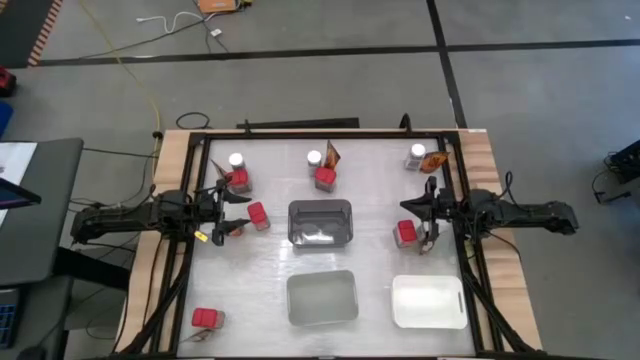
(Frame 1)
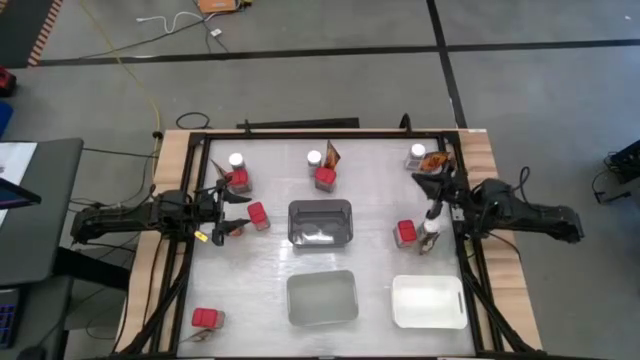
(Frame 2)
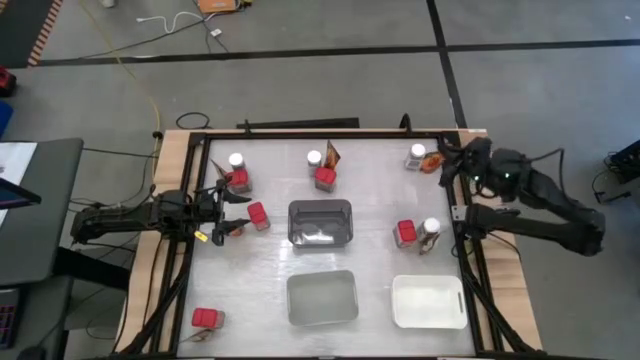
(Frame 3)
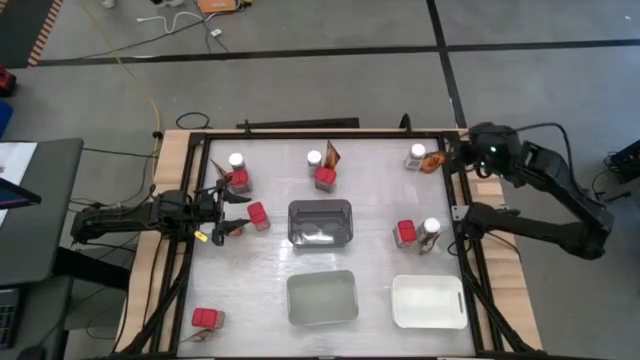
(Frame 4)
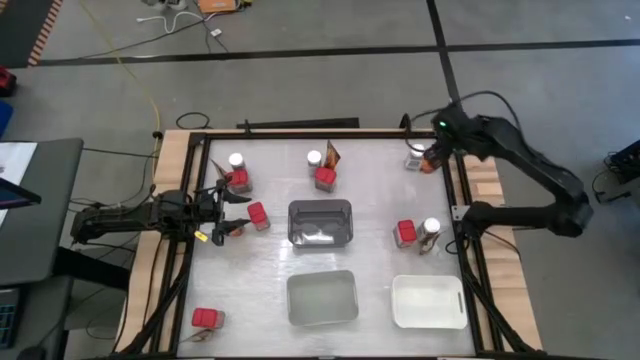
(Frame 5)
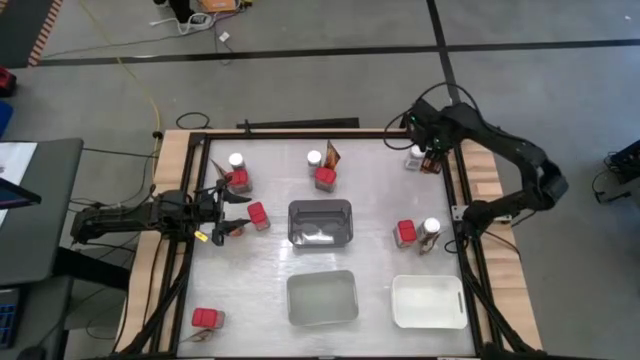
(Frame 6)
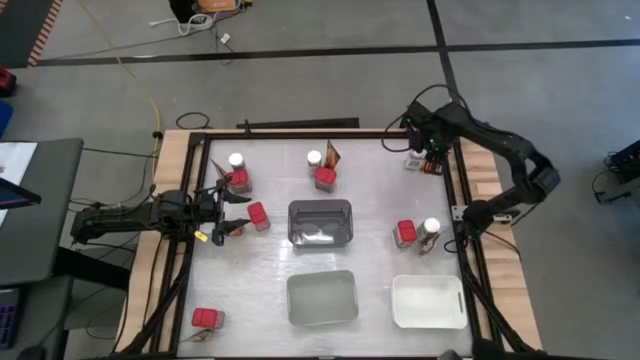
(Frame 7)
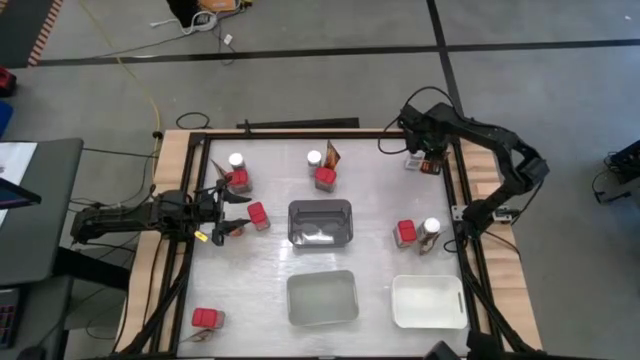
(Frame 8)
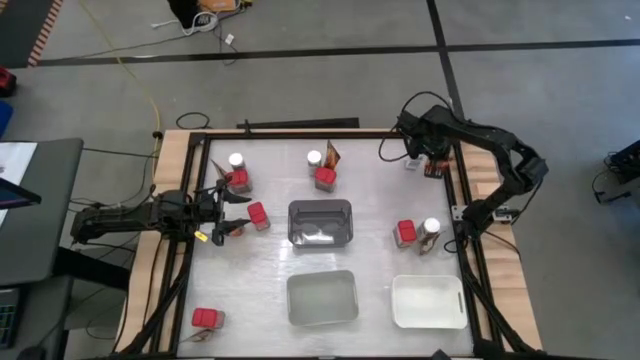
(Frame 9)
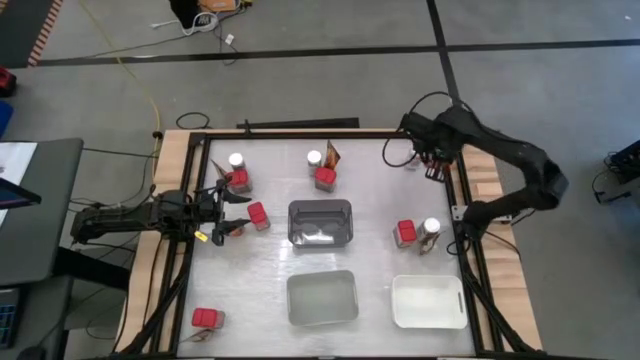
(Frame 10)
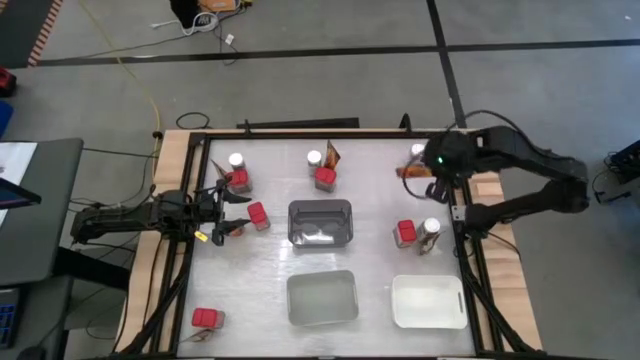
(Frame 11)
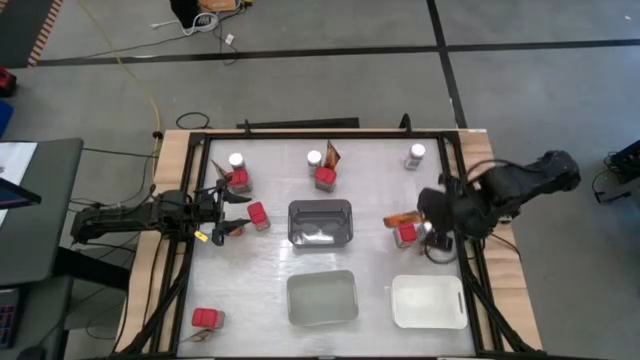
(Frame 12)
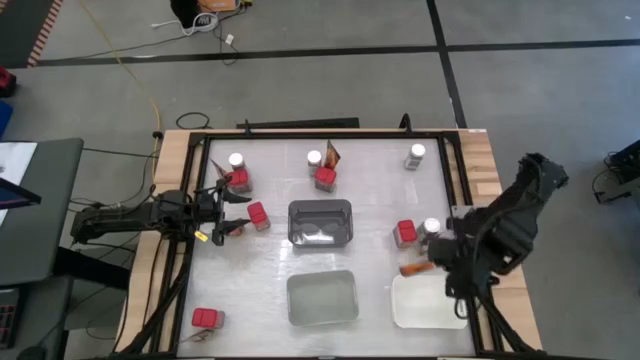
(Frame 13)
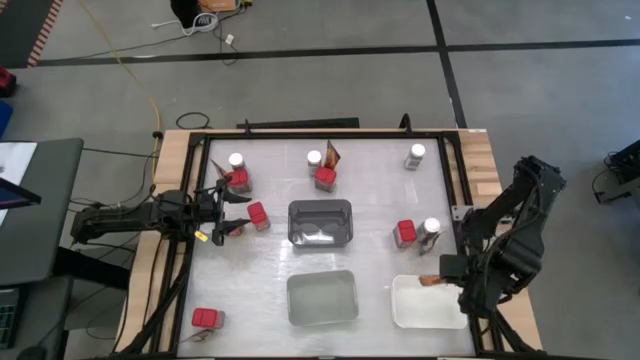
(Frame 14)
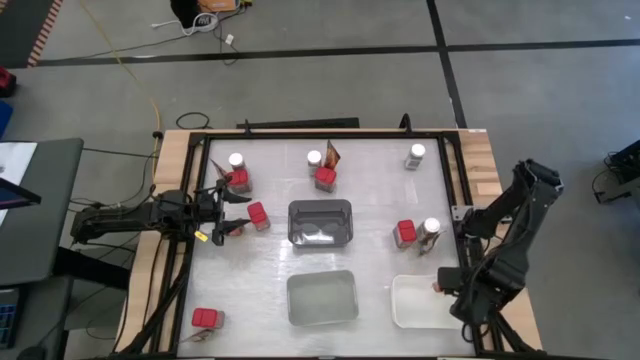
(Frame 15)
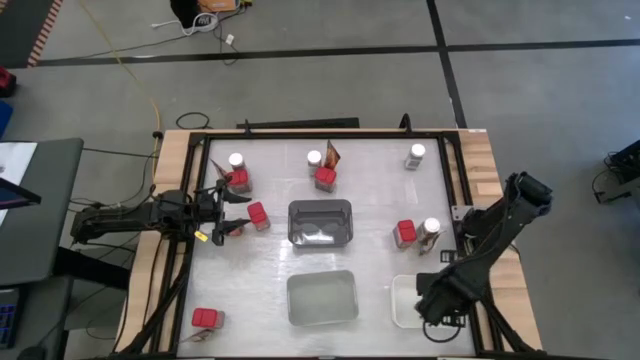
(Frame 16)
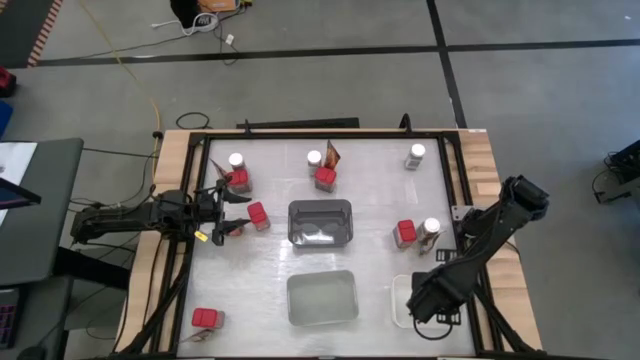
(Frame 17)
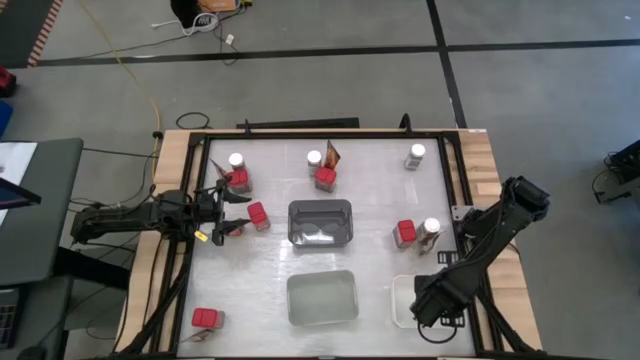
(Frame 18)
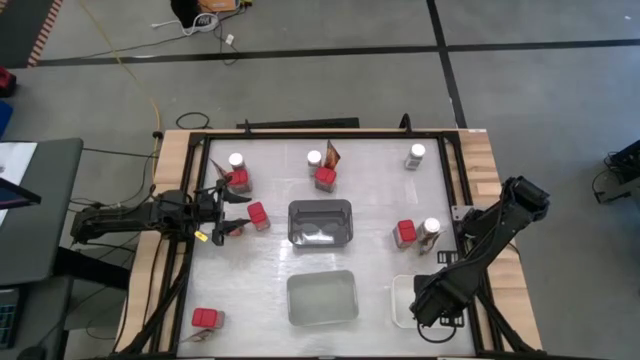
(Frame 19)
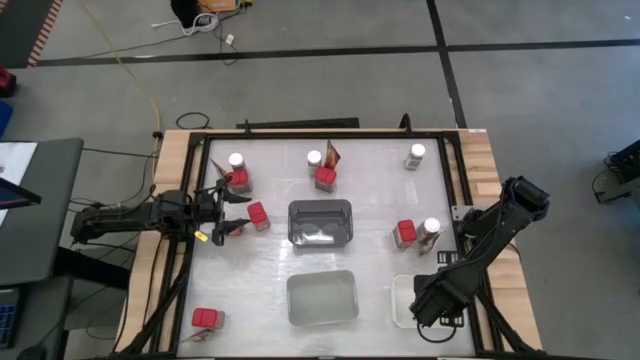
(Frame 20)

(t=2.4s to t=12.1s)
Task: Sort spices by type
Put the orange seasoning pack into the white bin

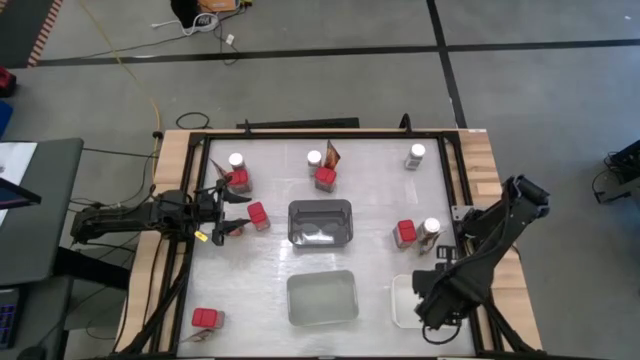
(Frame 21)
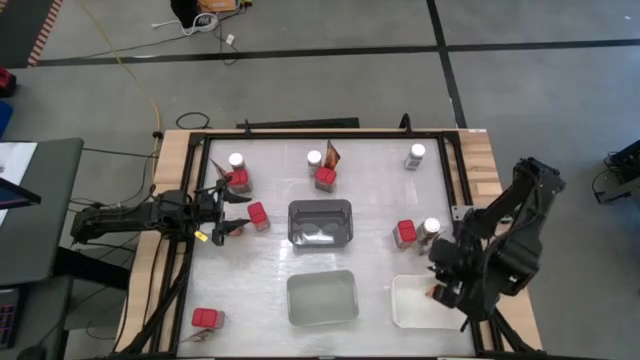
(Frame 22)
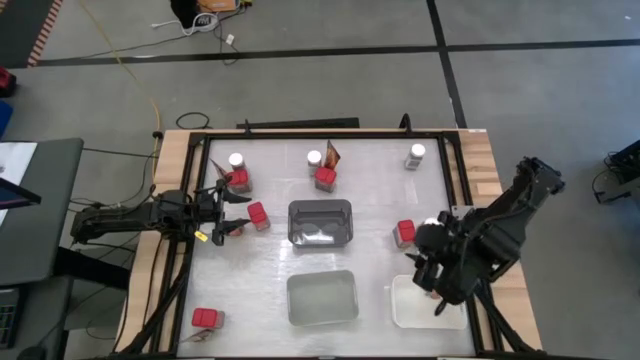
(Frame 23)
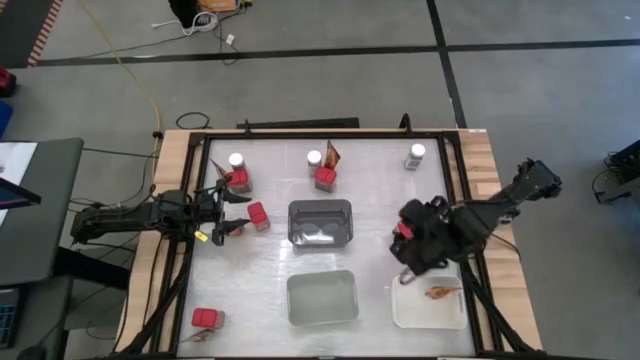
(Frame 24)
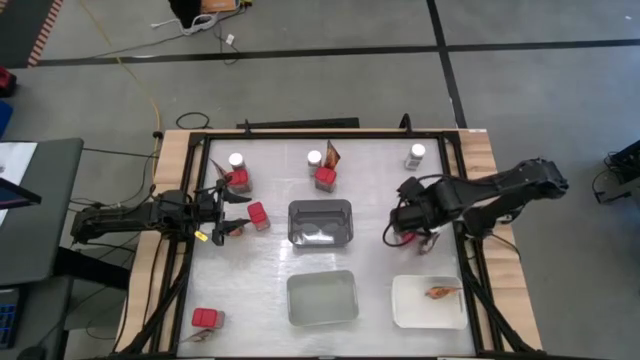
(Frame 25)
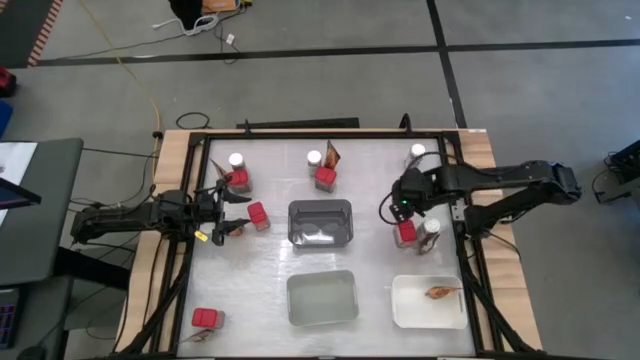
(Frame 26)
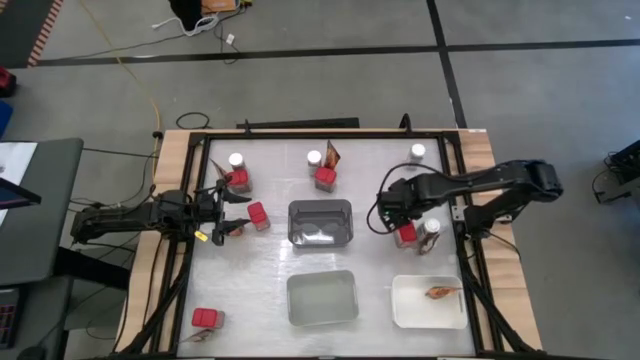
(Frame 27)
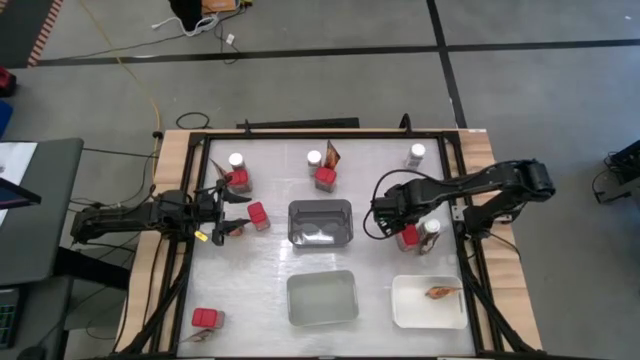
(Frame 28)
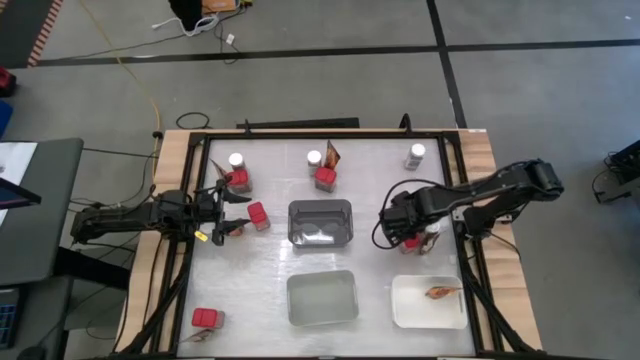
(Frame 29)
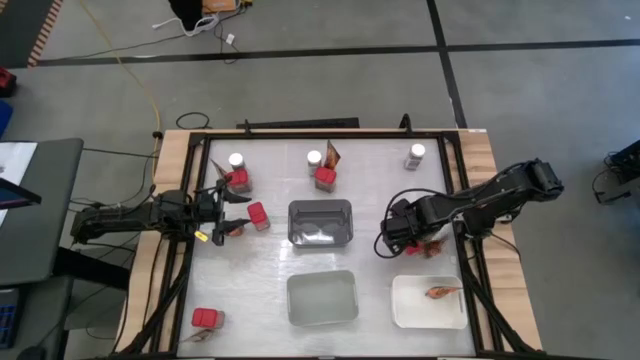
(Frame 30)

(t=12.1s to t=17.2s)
Put the red seasoning can into the black bin

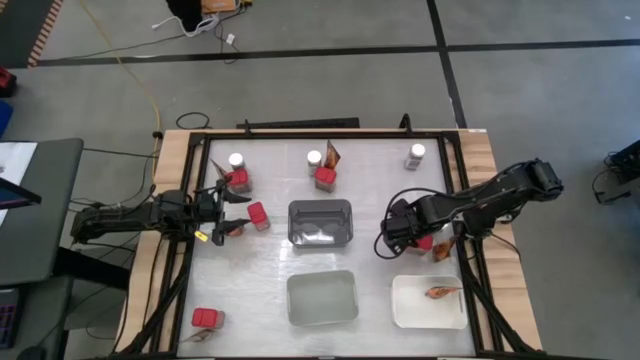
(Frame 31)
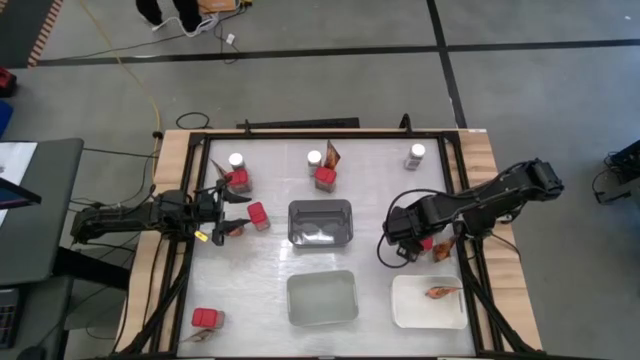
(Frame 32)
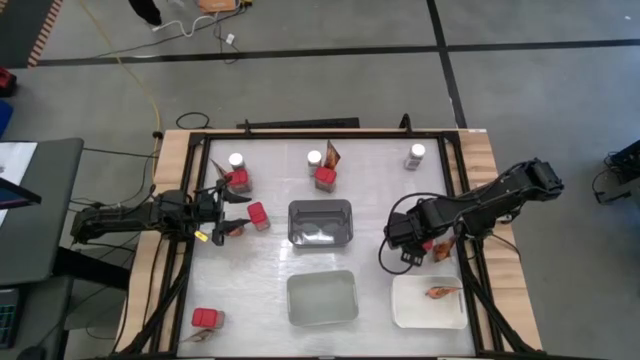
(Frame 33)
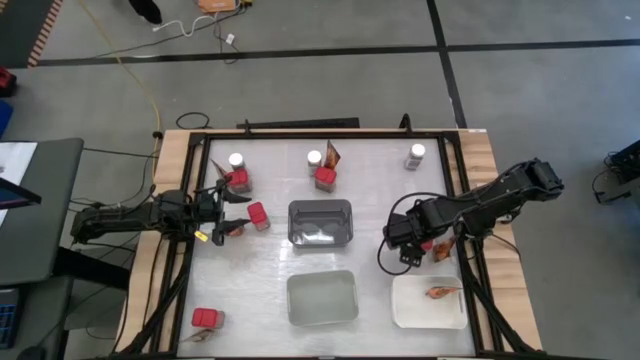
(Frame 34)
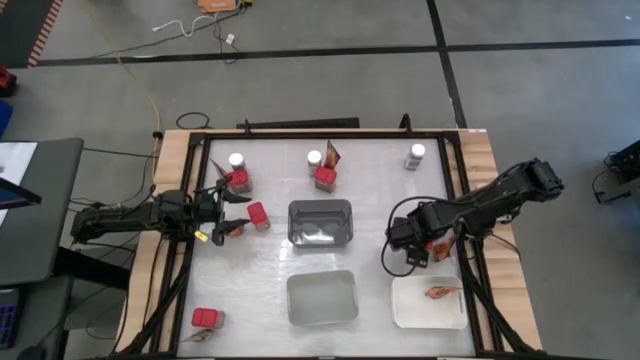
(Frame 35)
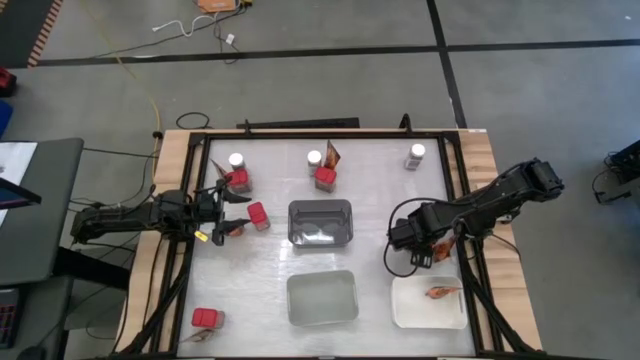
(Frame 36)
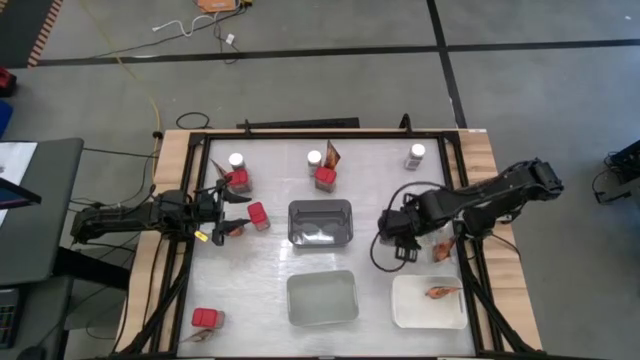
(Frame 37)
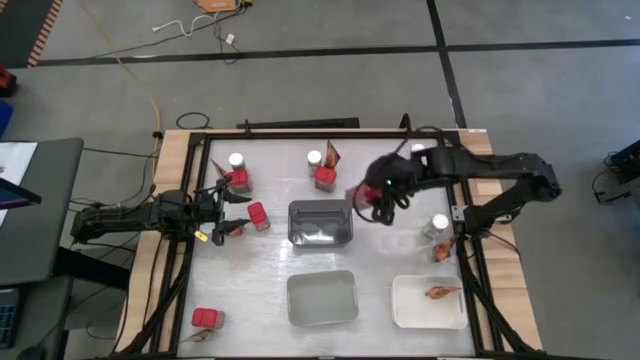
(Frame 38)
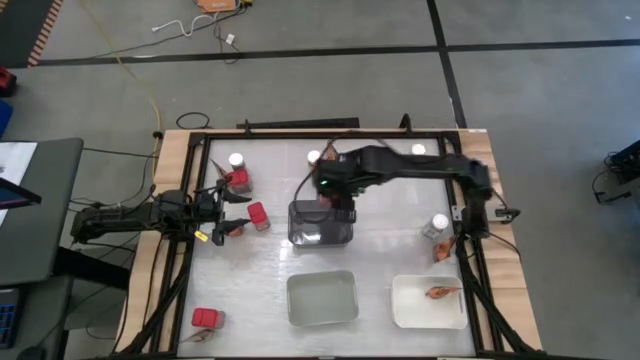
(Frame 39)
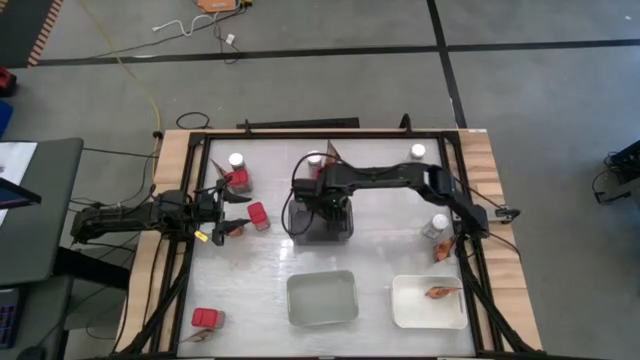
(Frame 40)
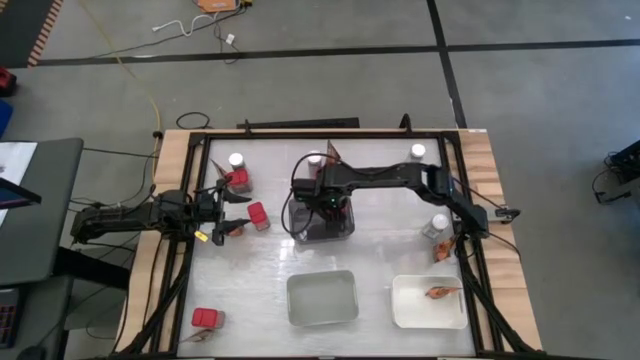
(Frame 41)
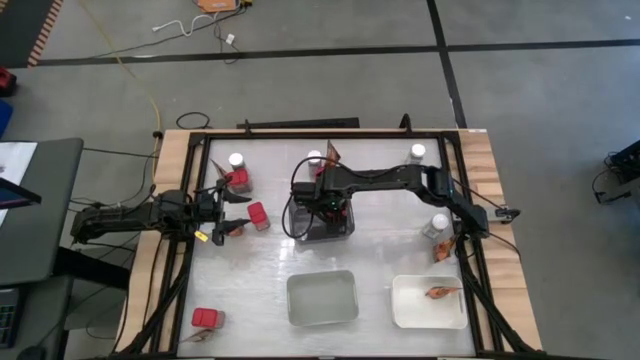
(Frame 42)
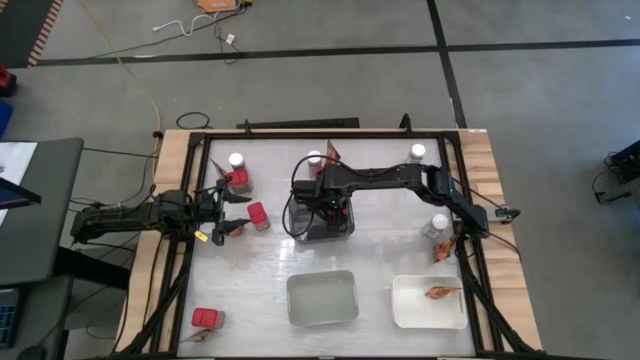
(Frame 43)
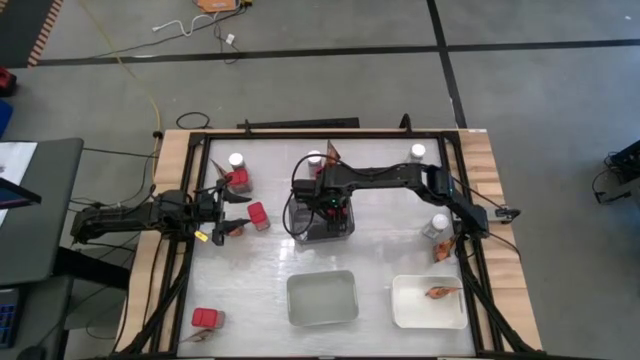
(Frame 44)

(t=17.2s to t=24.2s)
Put the red seasoning can into the black bin
